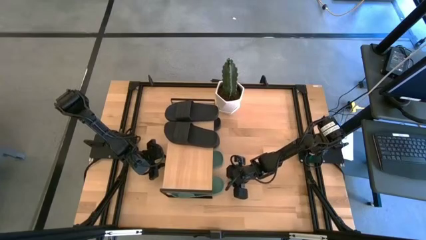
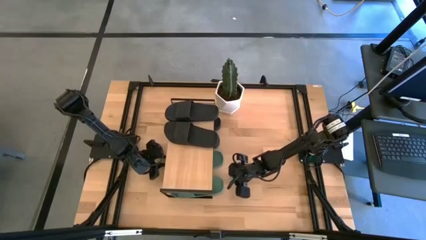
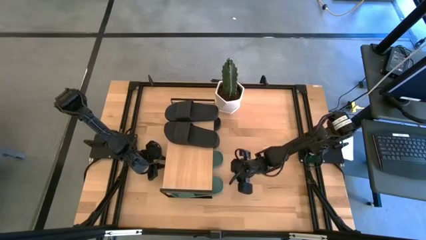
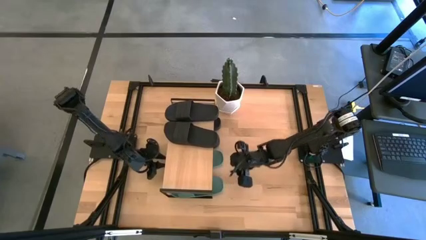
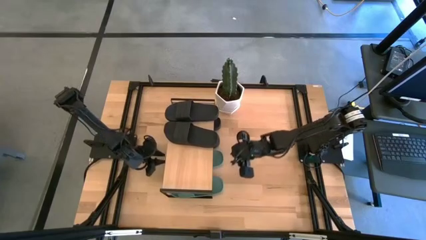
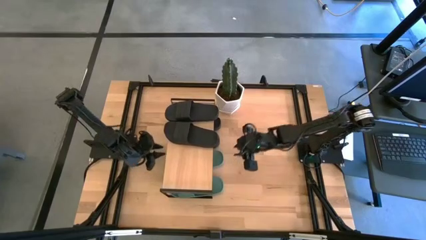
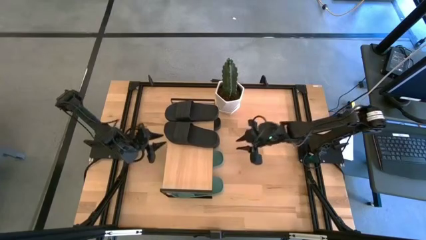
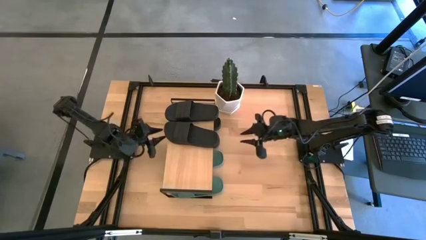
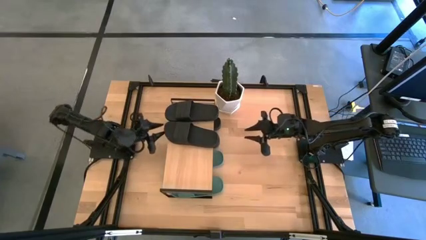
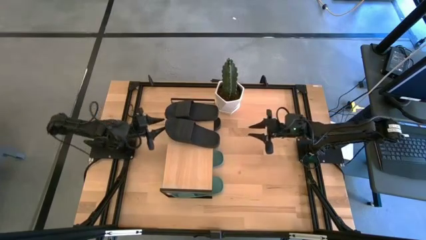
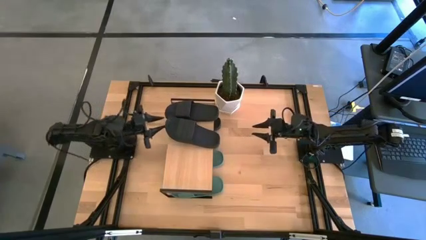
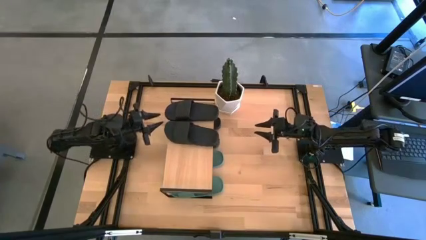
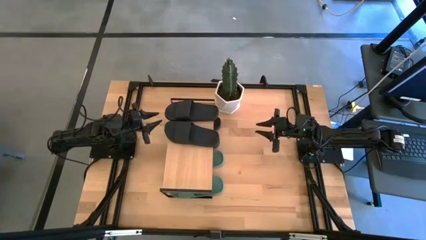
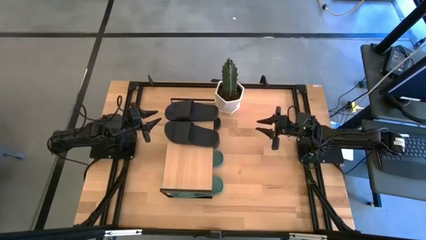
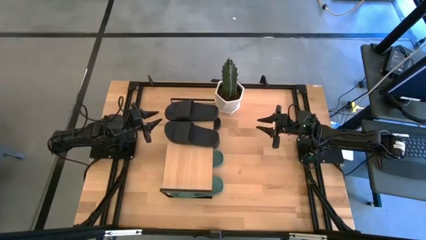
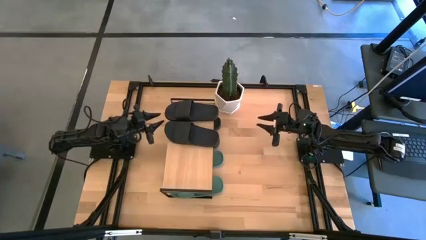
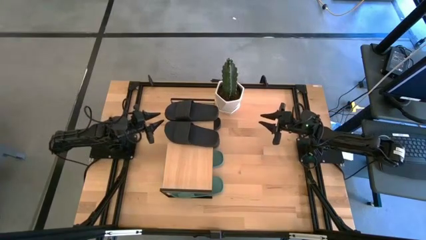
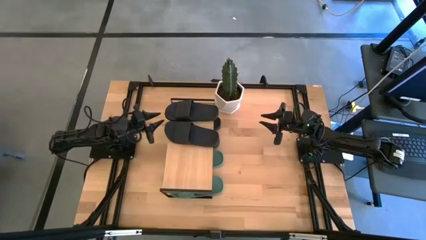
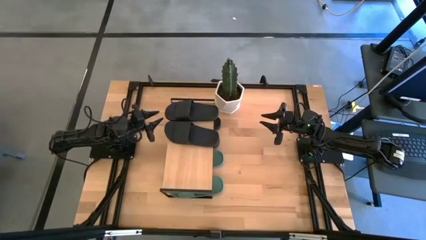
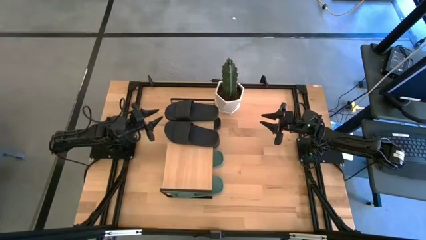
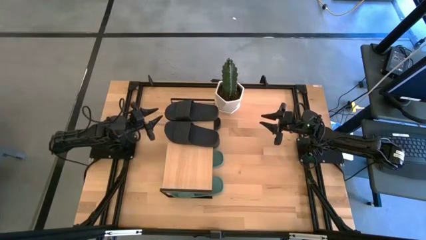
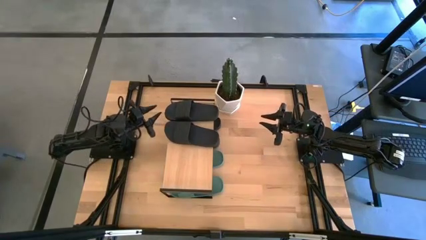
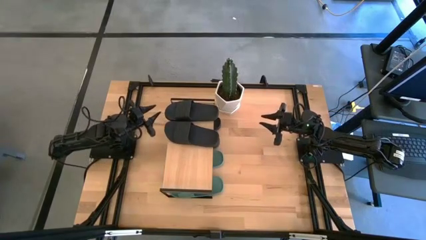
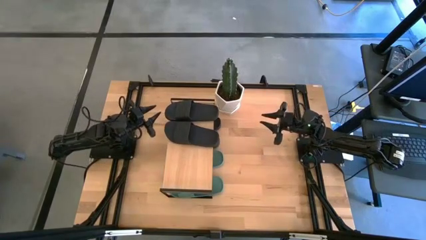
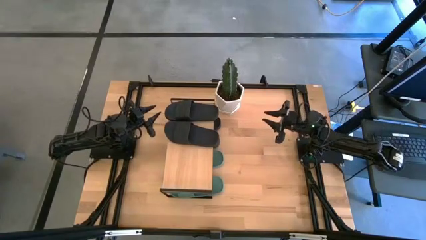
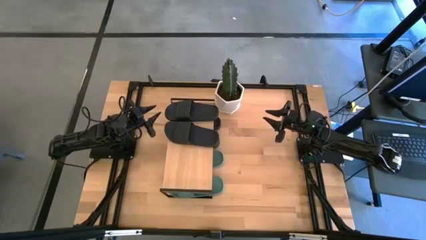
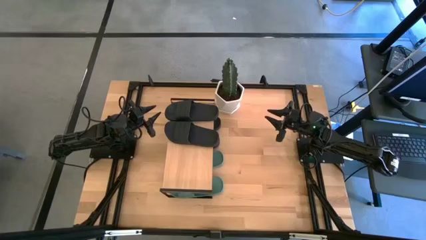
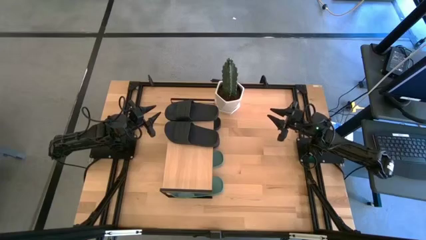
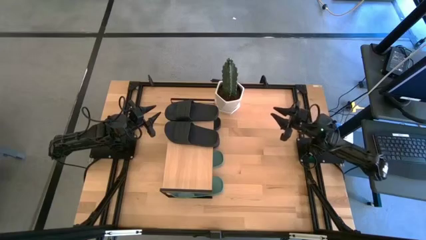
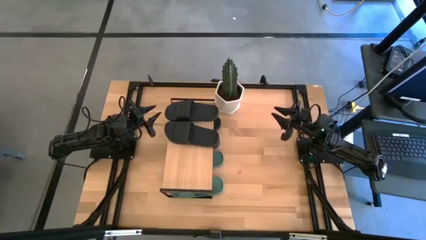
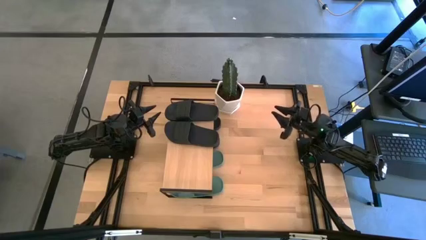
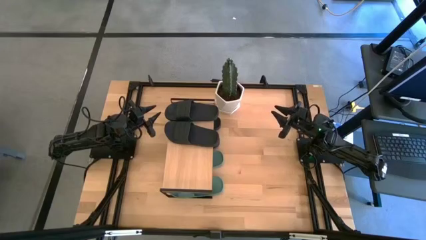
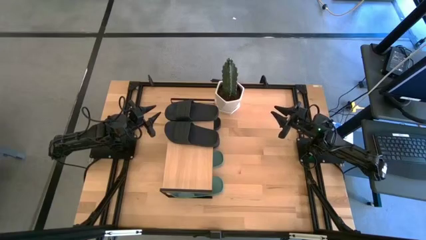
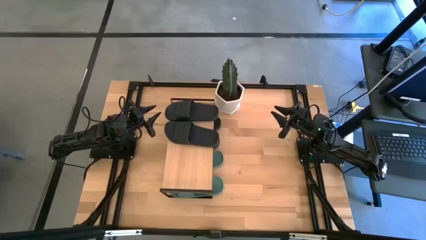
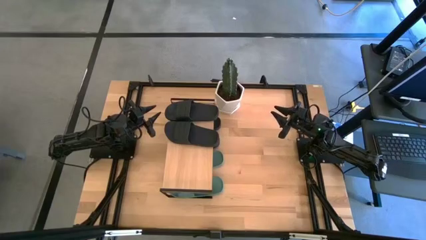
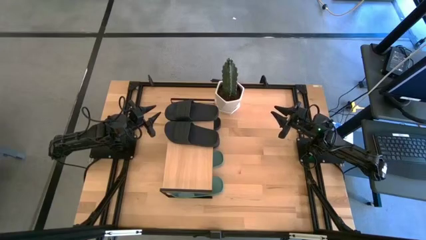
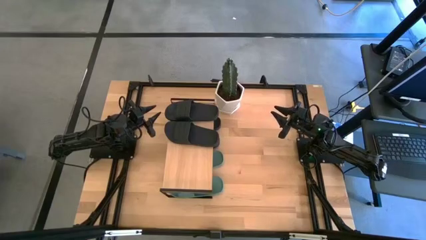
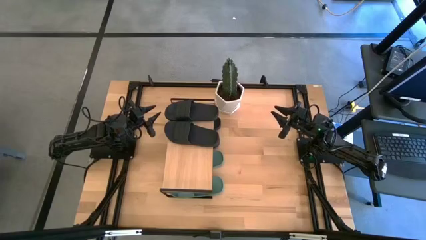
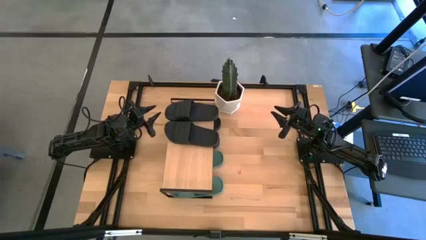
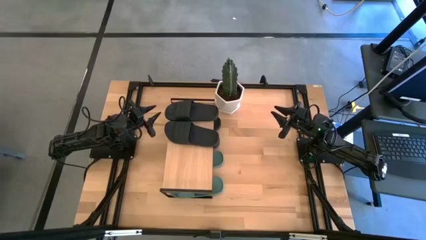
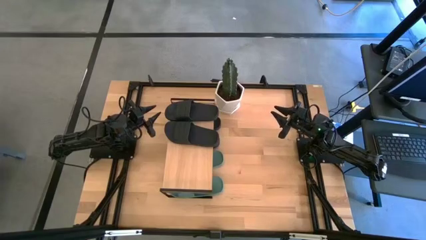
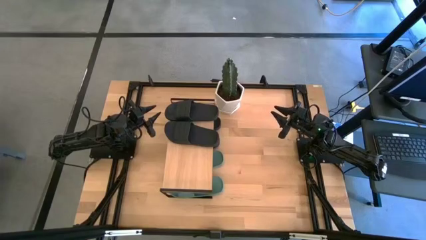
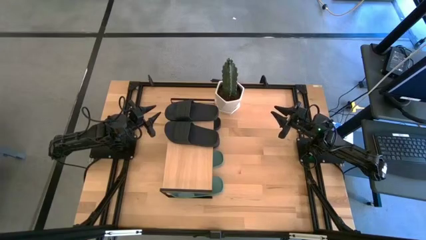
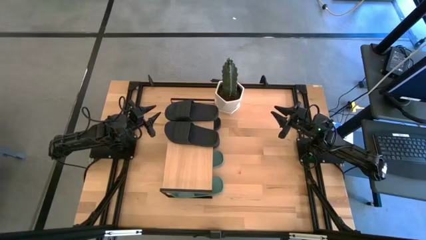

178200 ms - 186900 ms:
Task: Pick and place slides into the shelf
Return to Home Position
